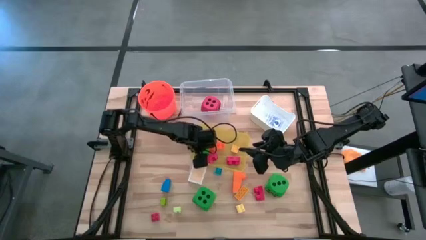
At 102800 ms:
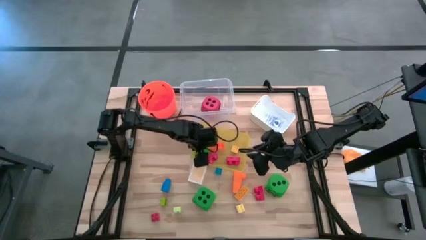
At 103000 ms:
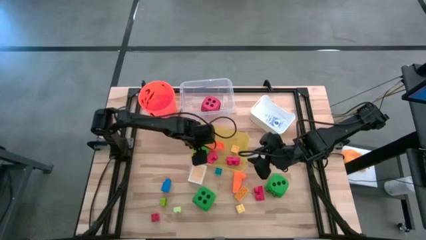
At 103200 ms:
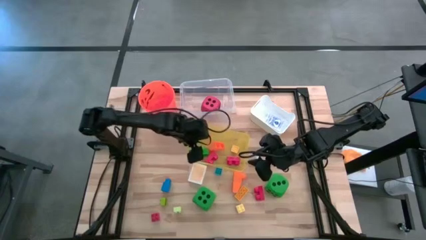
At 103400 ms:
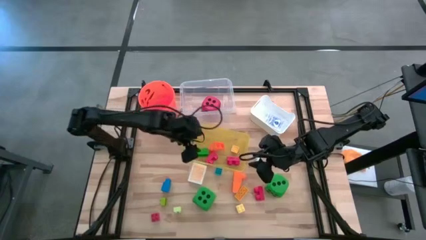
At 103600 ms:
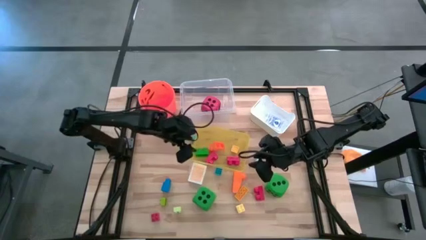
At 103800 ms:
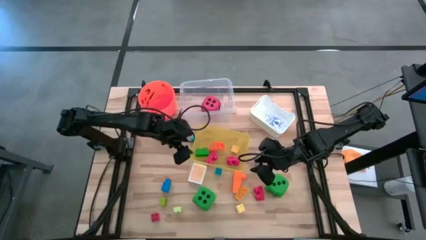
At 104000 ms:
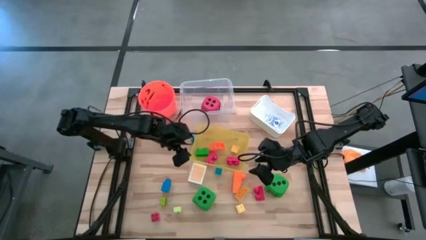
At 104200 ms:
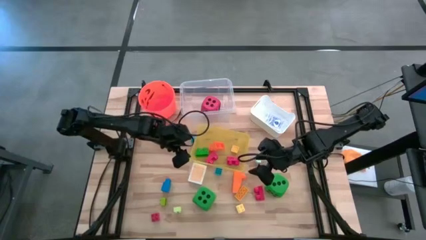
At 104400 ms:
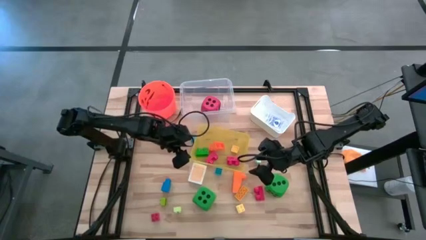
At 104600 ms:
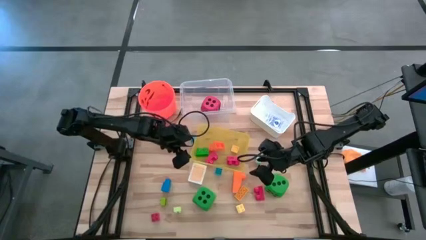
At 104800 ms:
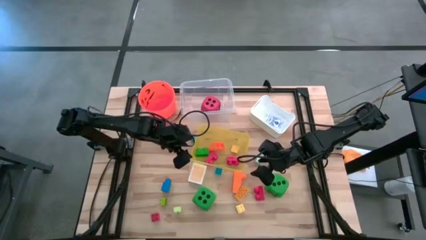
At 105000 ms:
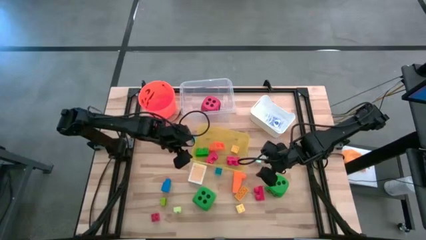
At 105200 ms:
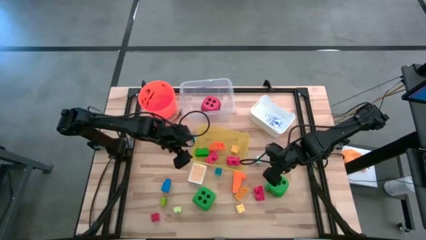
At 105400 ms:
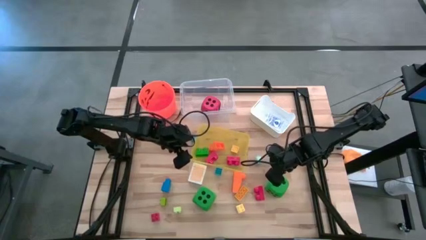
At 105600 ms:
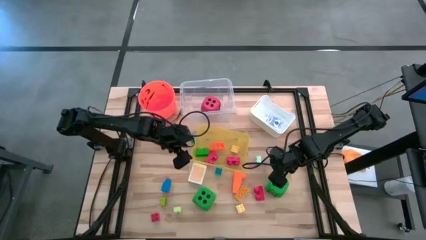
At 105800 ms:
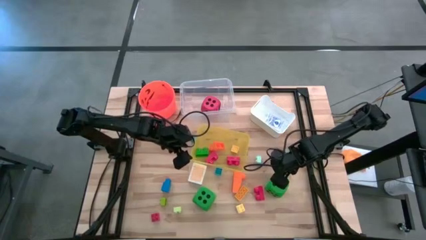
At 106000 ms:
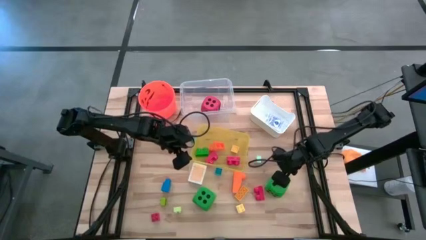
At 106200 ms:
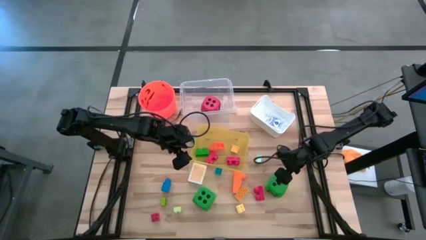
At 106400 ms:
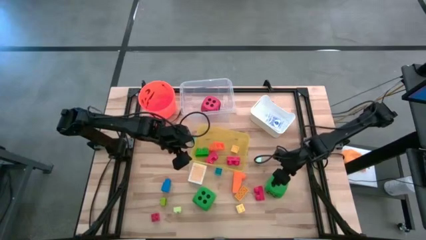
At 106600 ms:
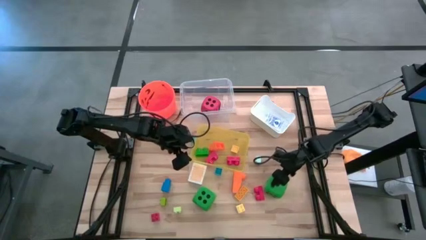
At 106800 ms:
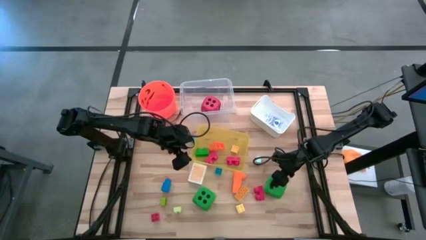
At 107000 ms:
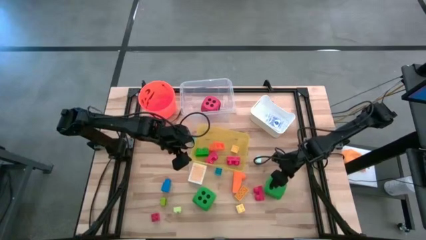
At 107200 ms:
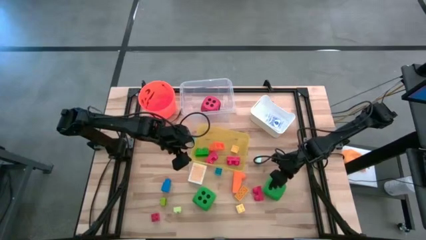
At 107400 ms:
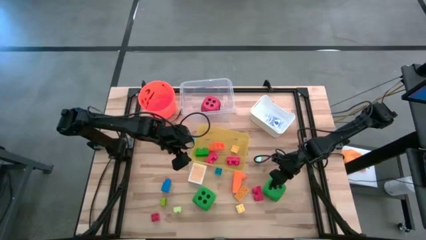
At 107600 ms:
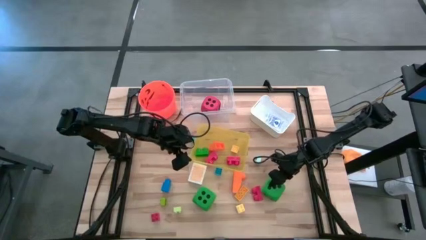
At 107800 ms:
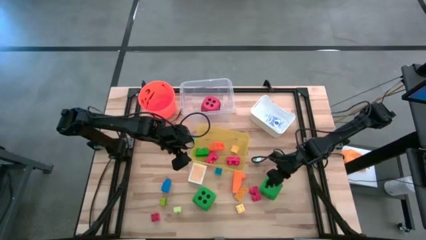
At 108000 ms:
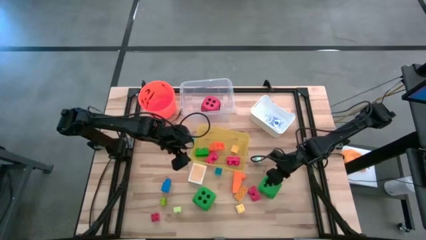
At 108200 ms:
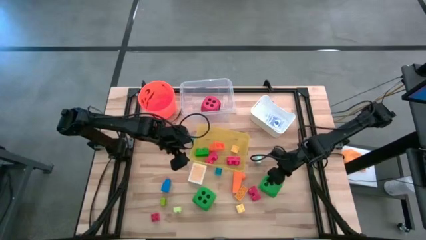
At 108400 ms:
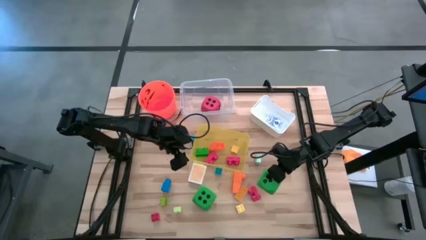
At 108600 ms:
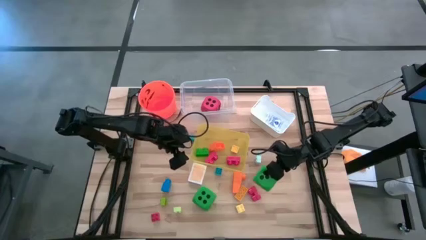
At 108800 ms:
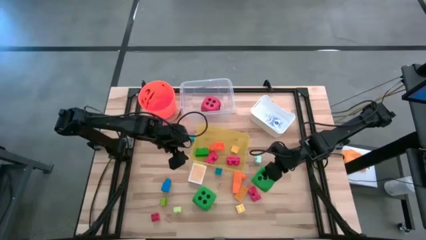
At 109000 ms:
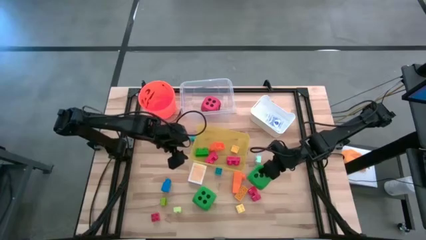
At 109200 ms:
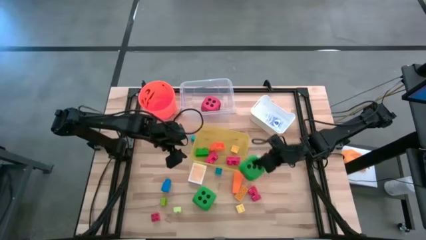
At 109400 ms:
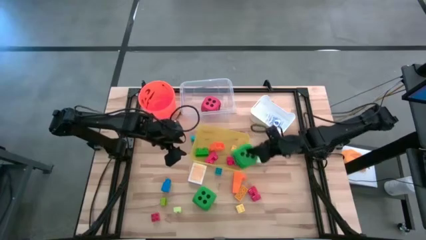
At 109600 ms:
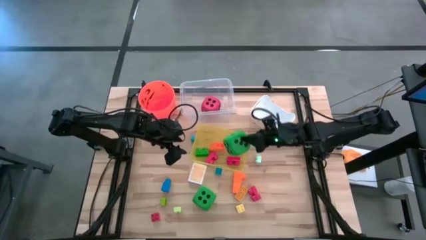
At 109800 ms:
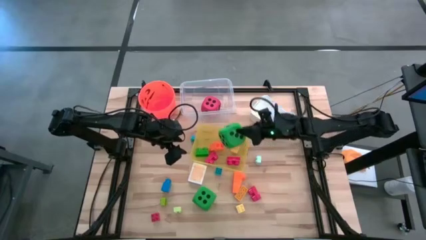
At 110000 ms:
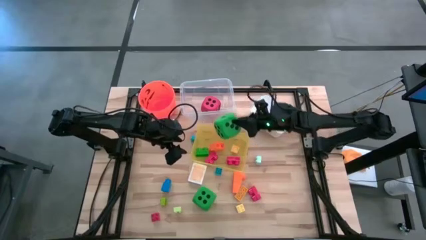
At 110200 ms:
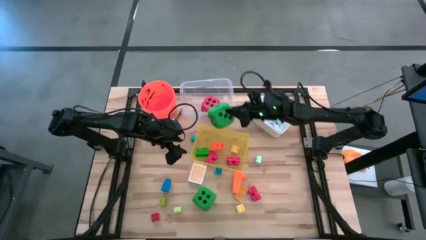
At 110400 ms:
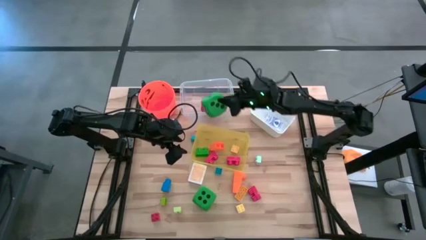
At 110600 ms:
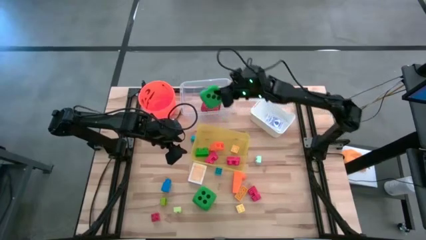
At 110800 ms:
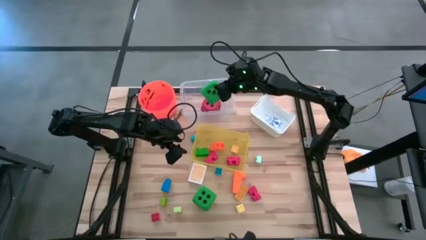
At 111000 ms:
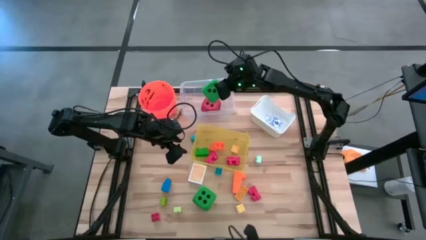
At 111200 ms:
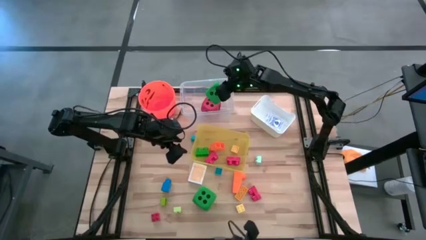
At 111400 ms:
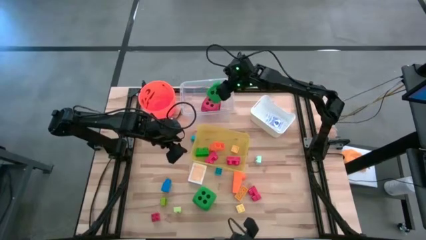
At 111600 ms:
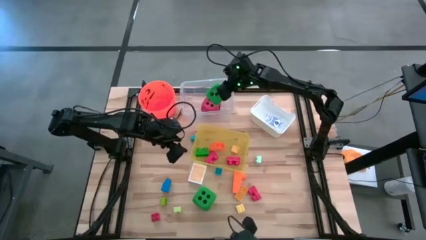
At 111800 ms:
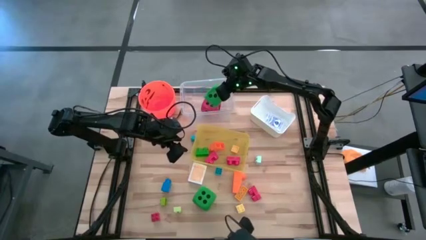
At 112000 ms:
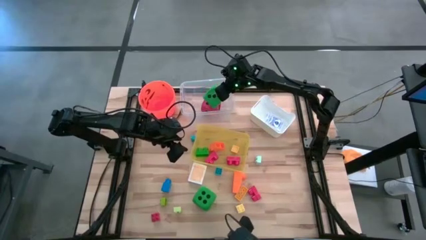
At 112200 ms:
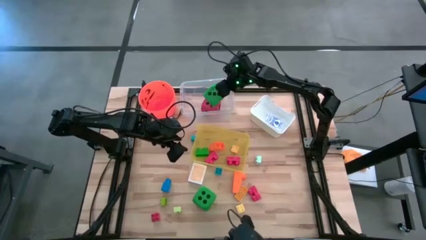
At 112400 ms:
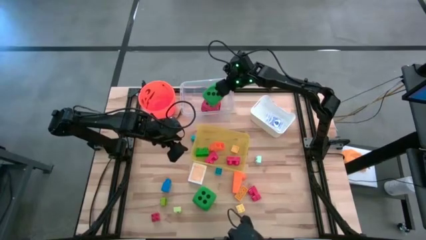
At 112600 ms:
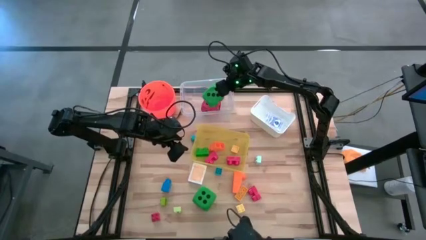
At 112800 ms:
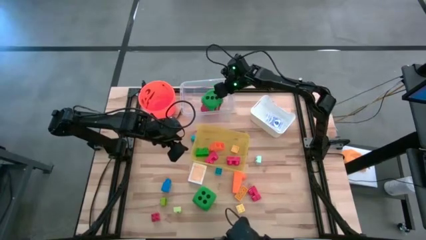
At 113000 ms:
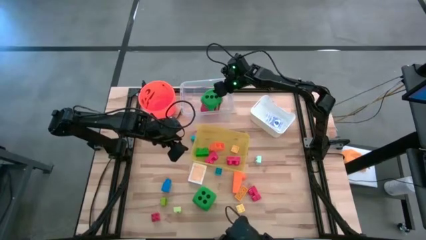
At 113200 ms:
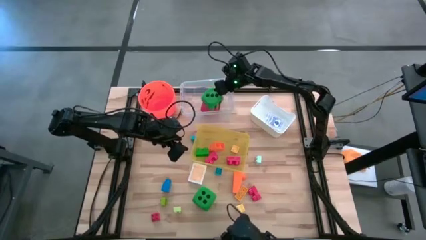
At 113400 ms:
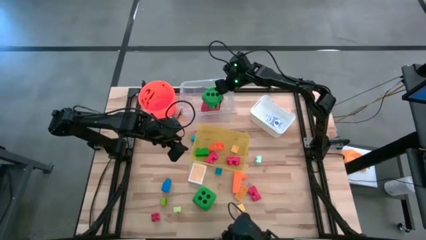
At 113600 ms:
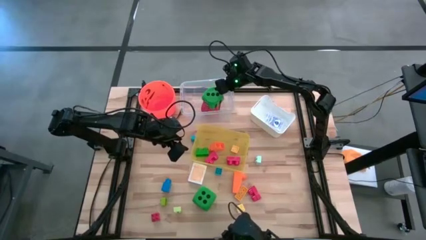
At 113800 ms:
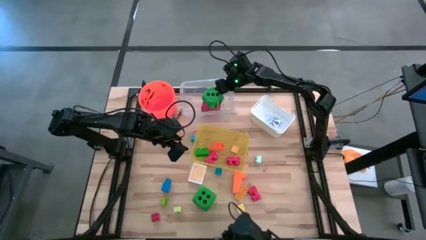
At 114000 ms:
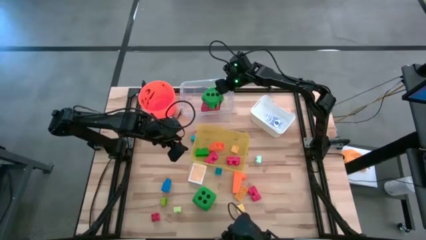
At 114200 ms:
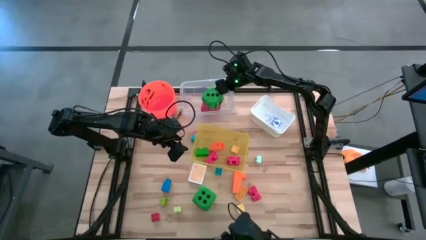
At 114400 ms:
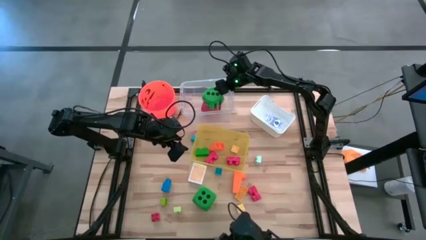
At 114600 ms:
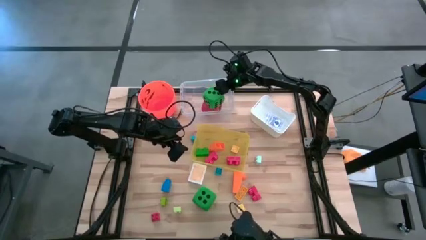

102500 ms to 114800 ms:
Task: Pick & Place Toys
Put the green dice into the transparent bin

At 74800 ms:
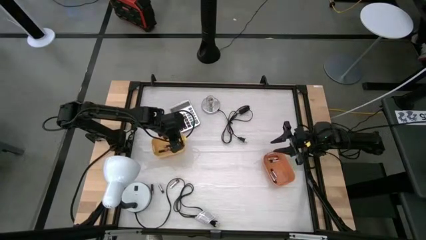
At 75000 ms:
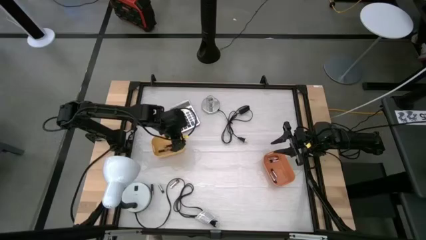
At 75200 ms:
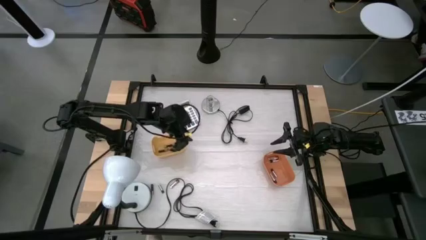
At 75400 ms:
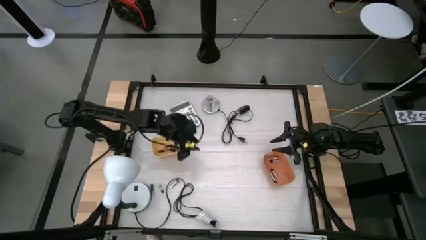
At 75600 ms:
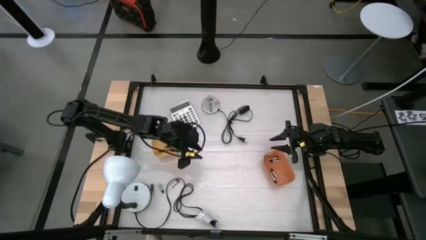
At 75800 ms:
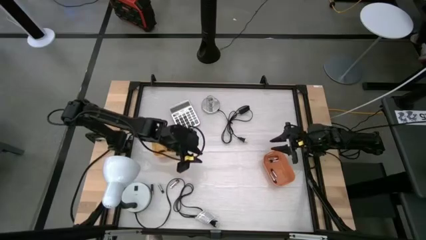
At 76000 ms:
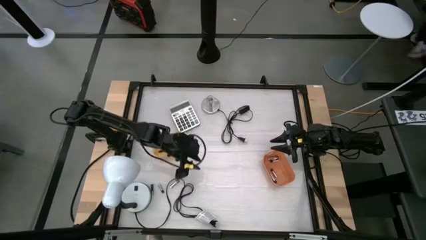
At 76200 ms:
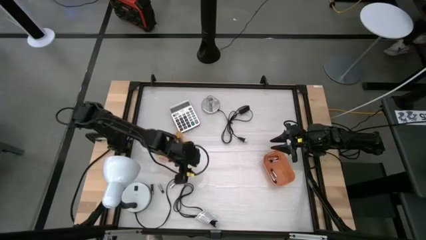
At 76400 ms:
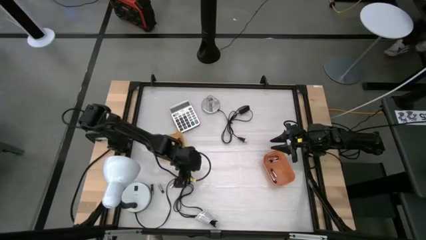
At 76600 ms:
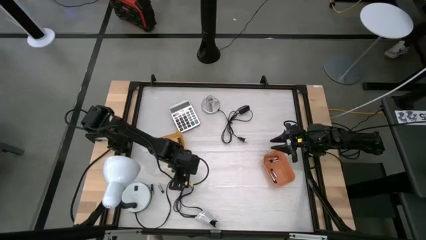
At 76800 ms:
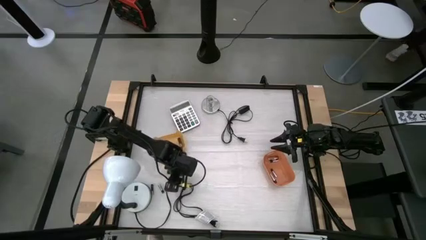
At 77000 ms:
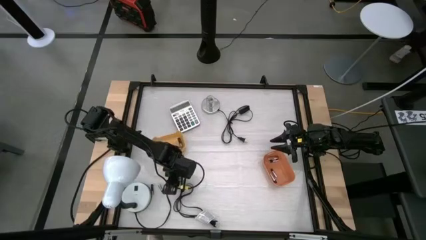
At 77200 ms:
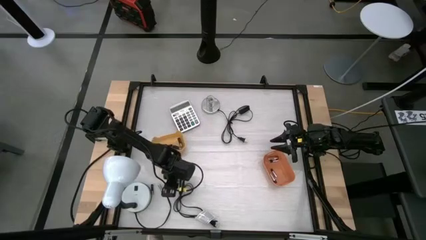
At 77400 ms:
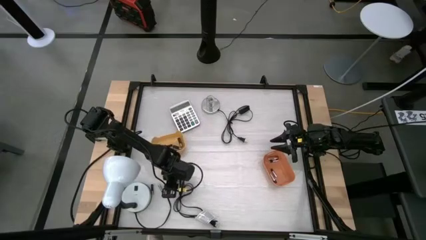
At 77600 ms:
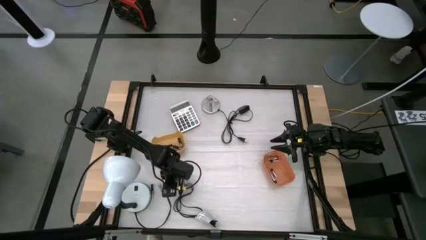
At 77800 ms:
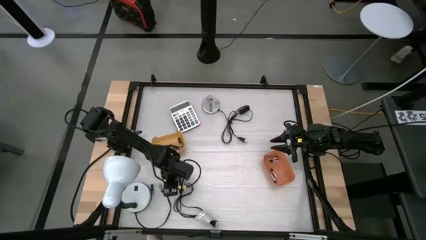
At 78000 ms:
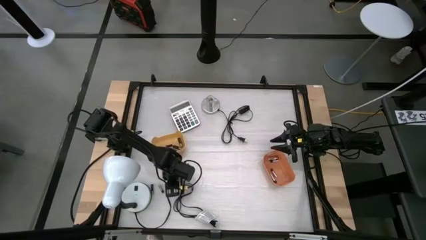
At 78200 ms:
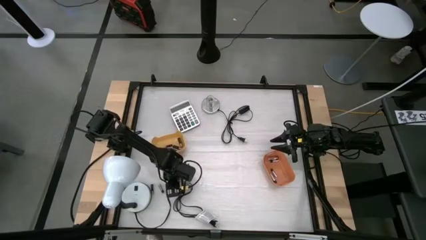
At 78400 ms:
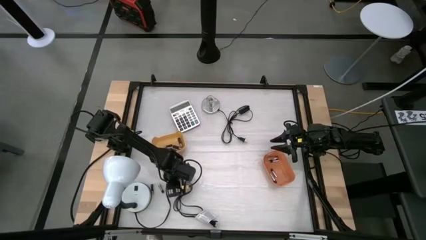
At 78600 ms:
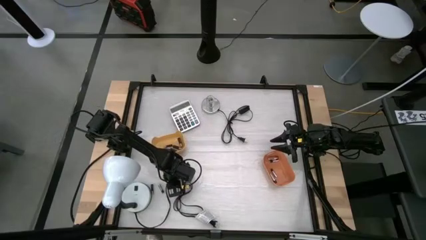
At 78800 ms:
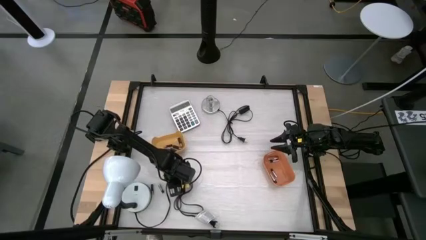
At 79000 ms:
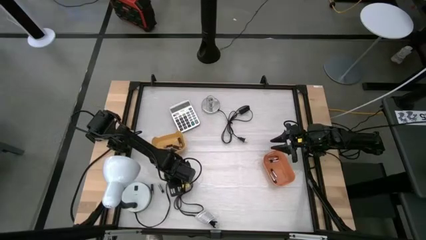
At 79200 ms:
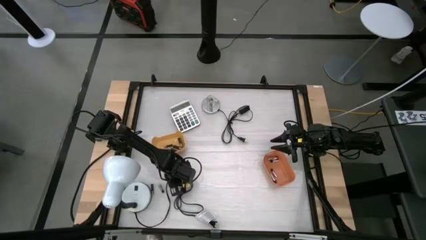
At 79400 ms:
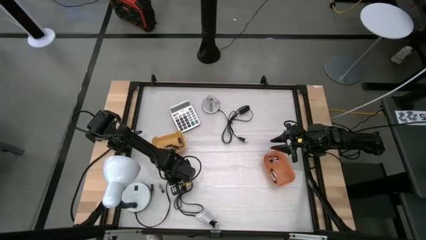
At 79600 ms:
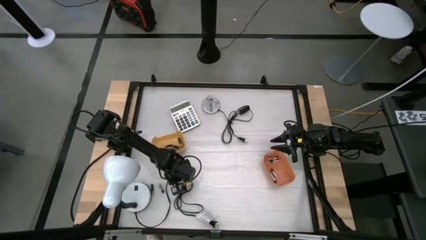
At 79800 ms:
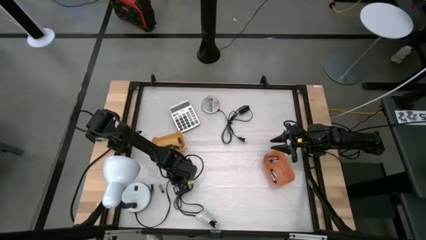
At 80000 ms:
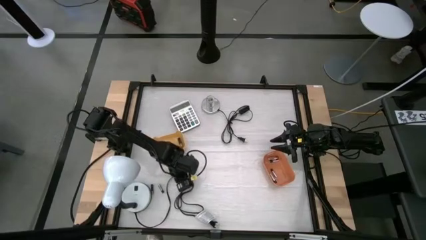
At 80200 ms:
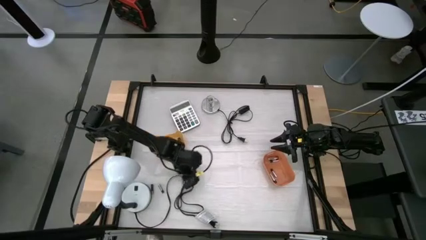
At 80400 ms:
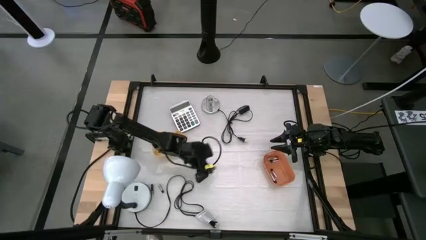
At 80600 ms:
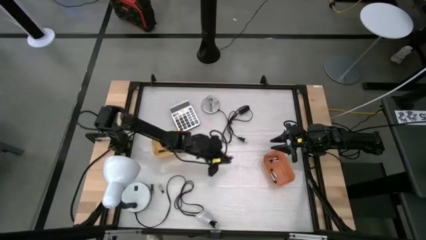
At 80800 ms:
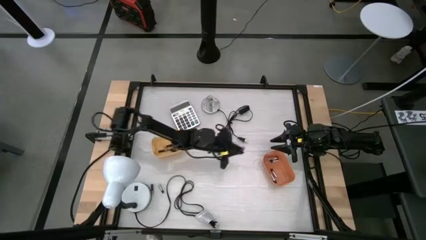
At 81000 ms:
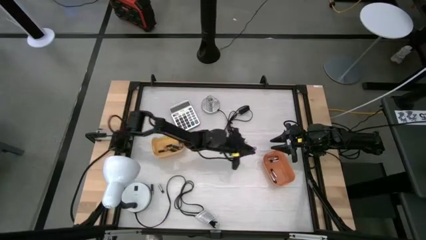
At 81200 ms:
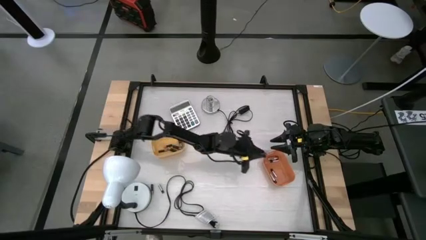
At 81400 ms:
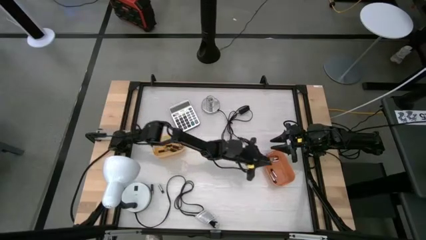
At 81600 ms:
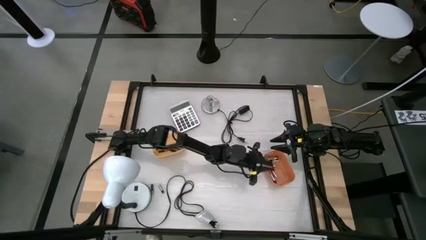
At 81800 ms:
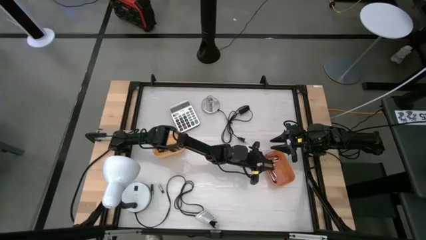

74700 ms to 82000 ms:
Task: Sort batteries
Put the silver battery into the orange bin
